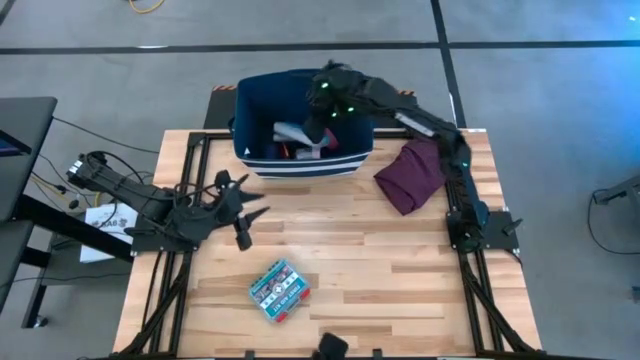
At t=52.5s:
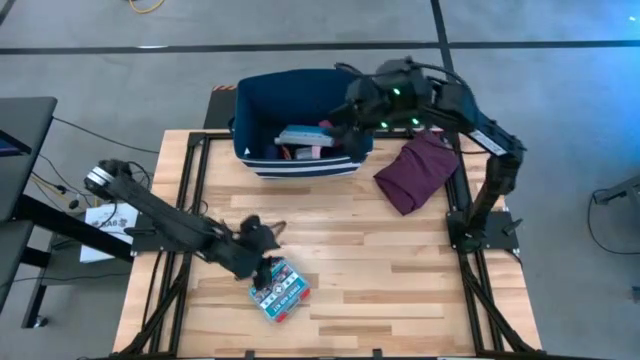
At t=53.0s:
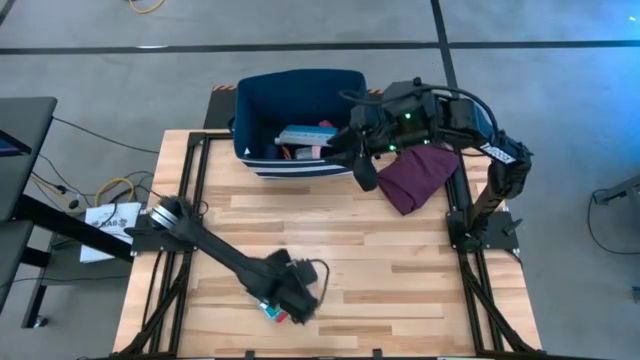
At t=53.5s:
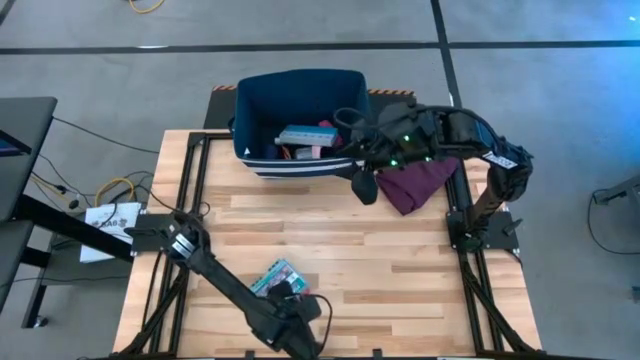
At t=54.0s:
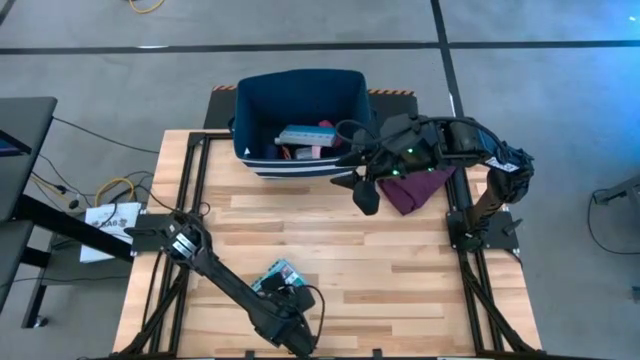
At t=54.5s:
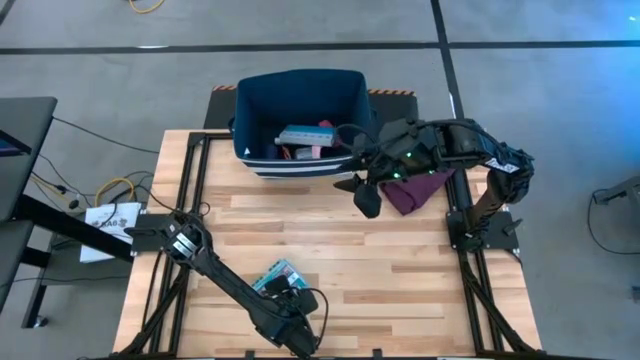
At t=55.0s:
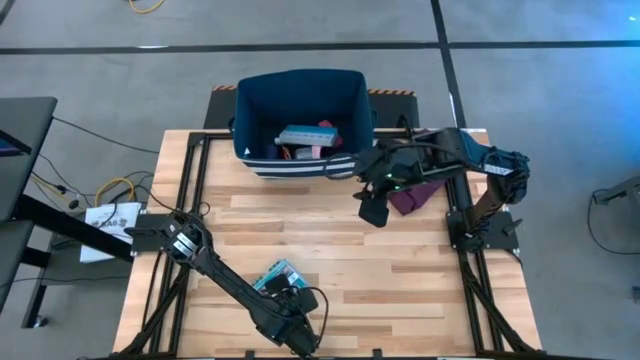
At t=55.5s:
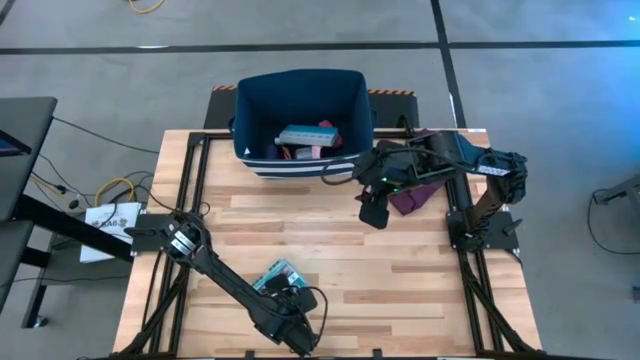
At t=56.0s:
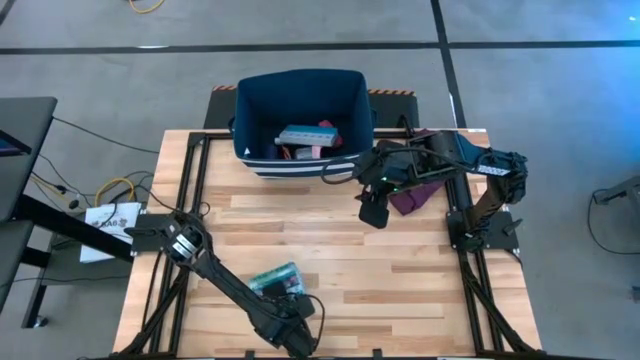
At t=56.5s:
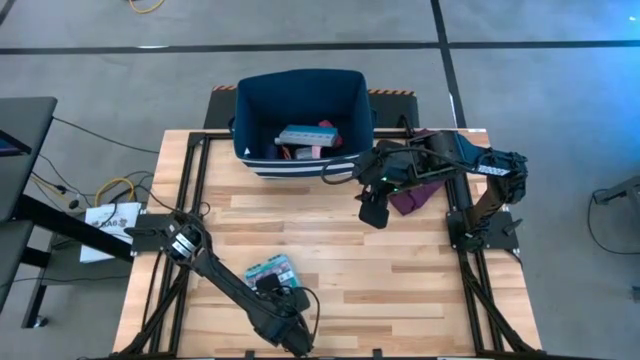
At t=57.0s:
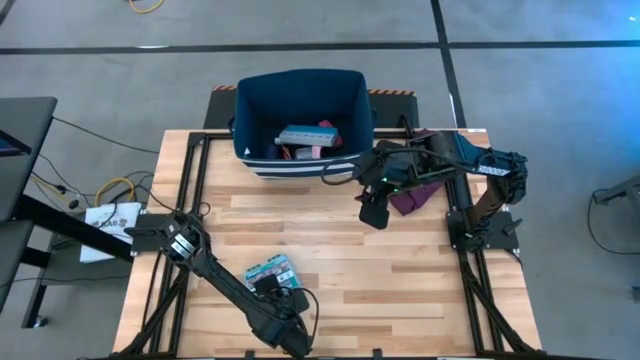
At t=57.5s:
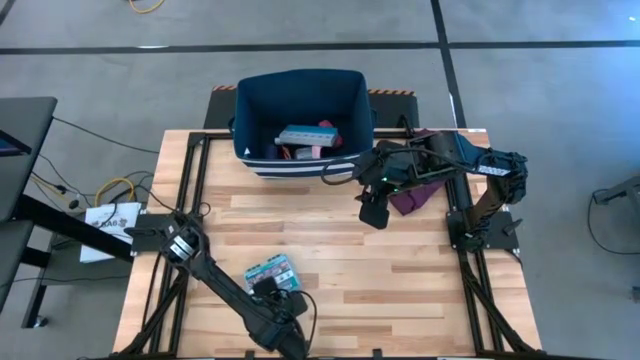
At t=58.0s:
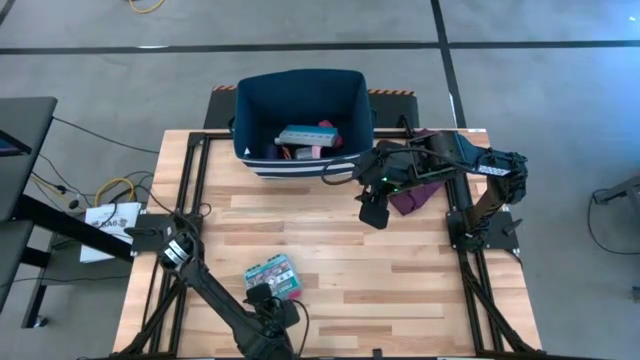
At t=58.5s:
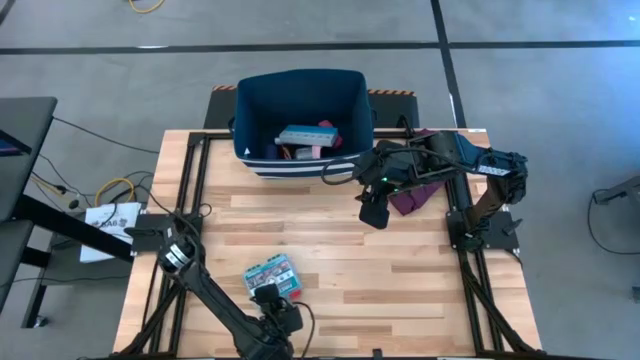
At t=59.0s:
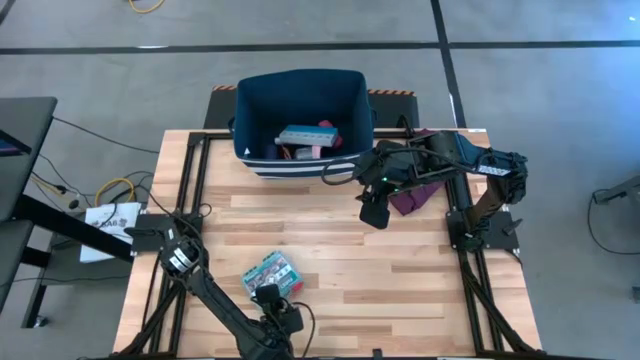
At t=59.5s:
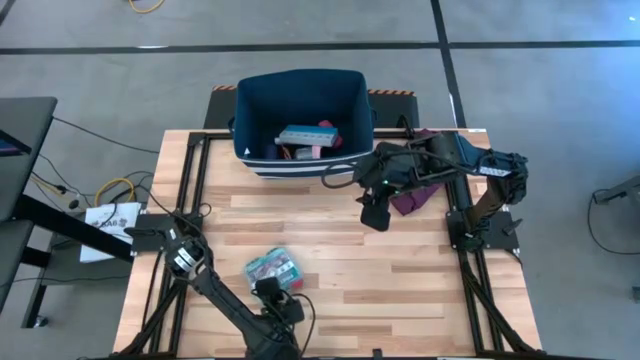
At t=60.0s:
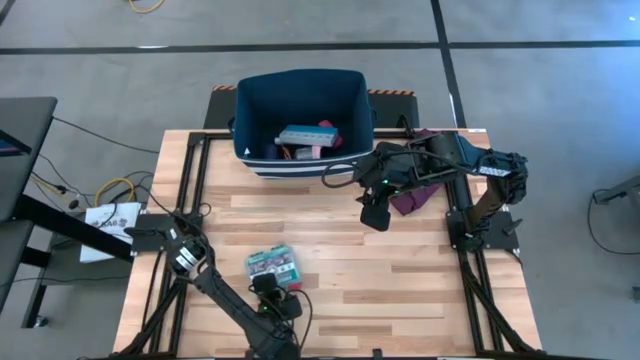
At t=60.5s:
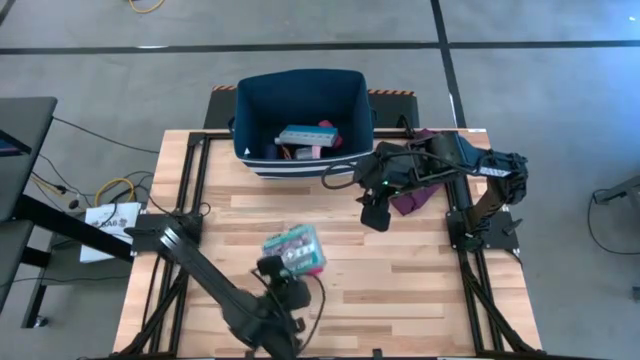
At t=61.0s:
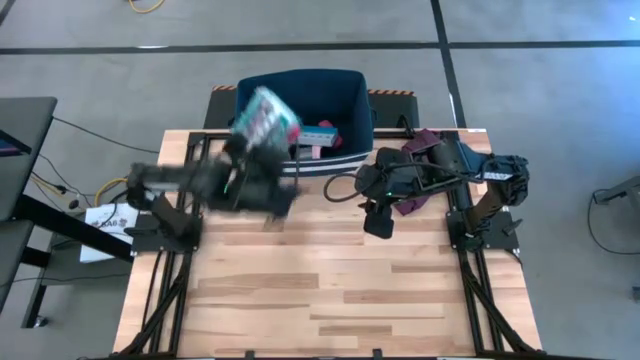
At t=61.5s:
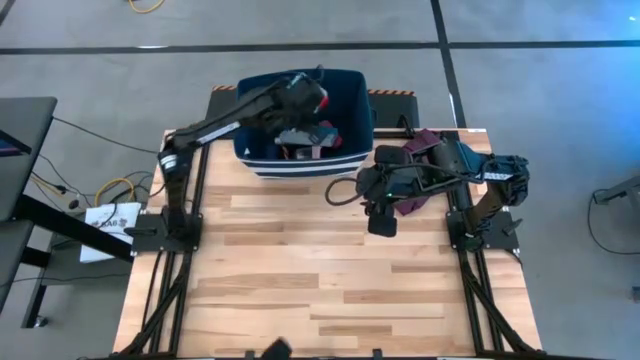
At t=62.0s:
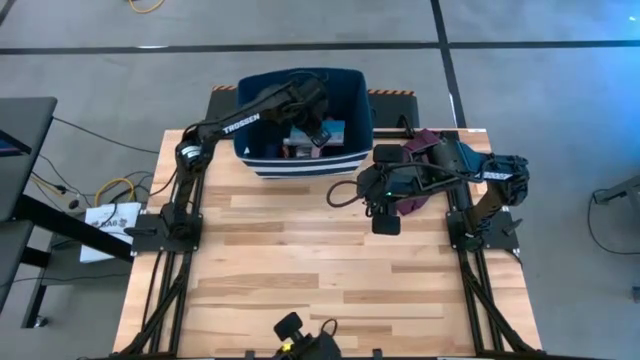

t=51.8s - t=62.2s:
Task: Pick & place medical supplies in basket/bin
Put the first aid kit box into the blue bin

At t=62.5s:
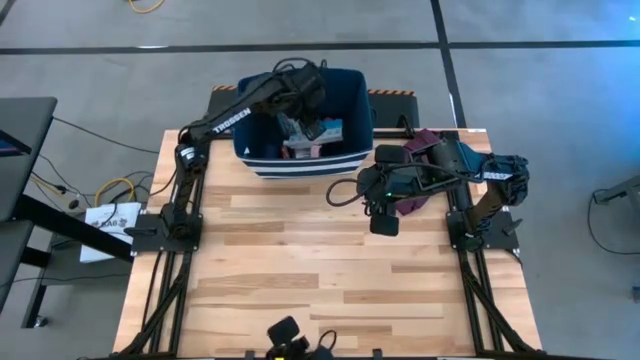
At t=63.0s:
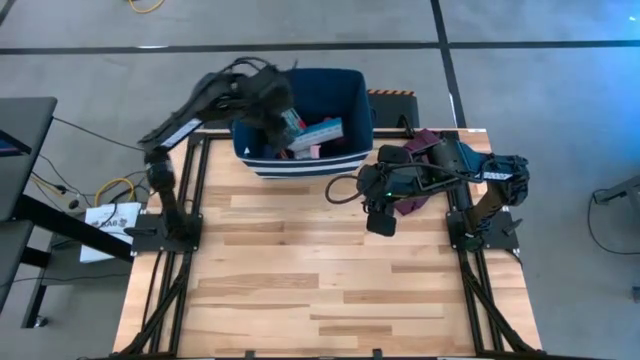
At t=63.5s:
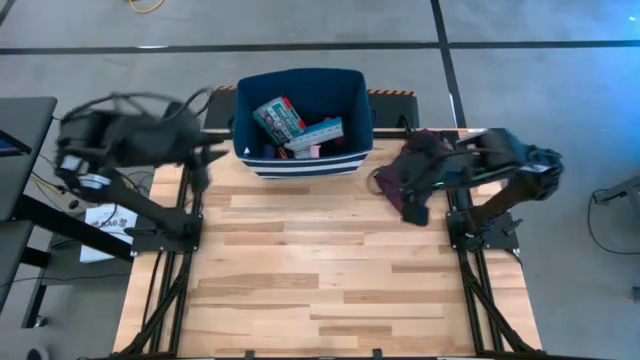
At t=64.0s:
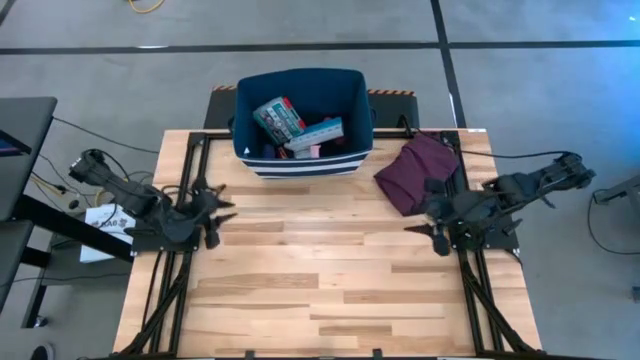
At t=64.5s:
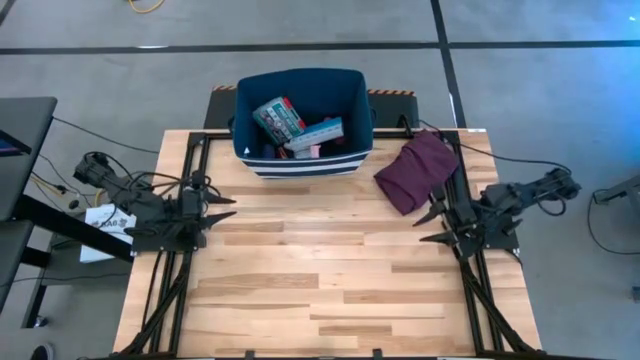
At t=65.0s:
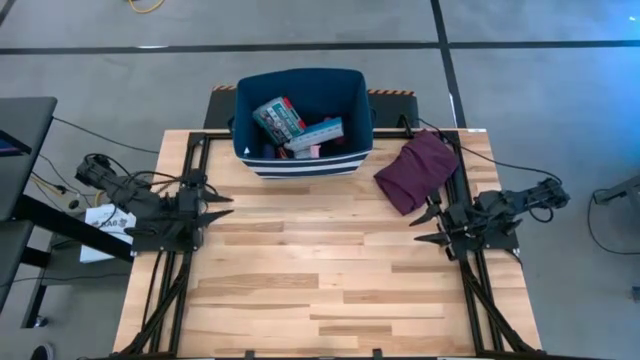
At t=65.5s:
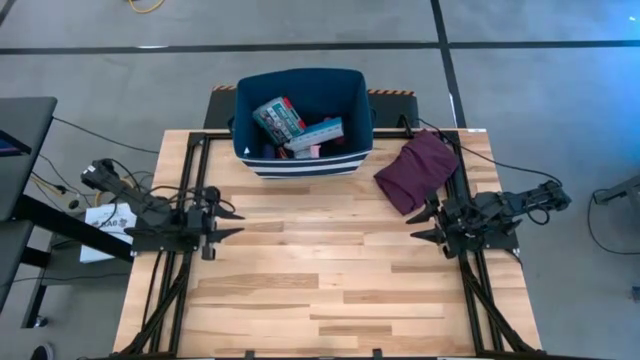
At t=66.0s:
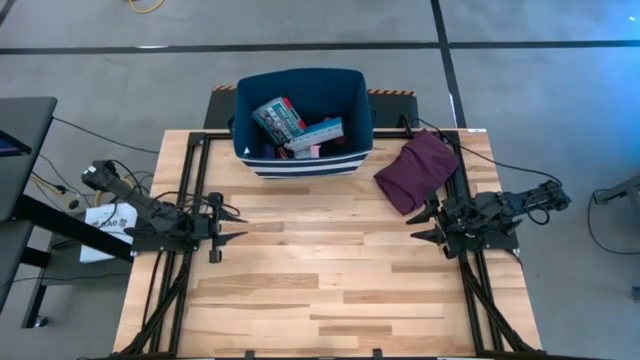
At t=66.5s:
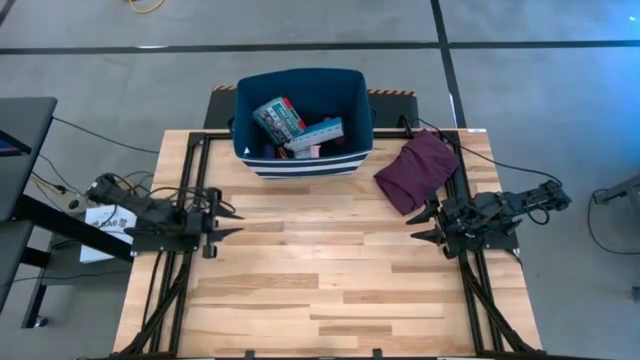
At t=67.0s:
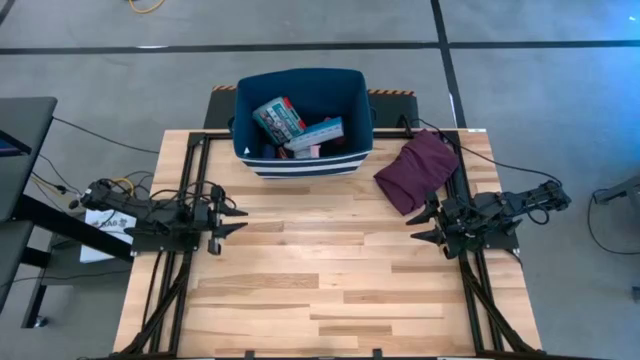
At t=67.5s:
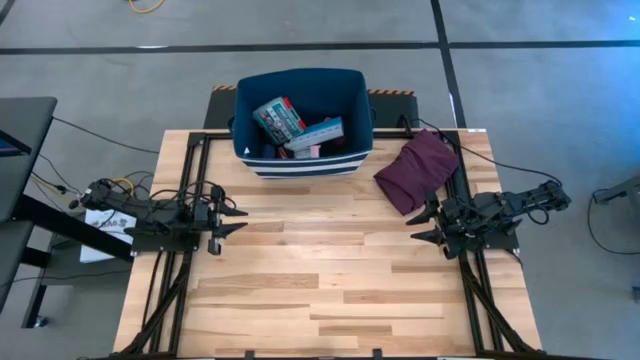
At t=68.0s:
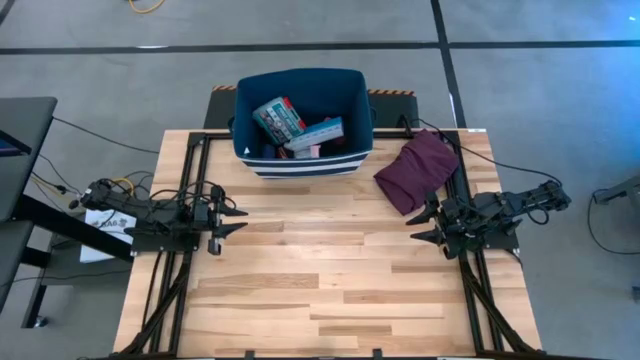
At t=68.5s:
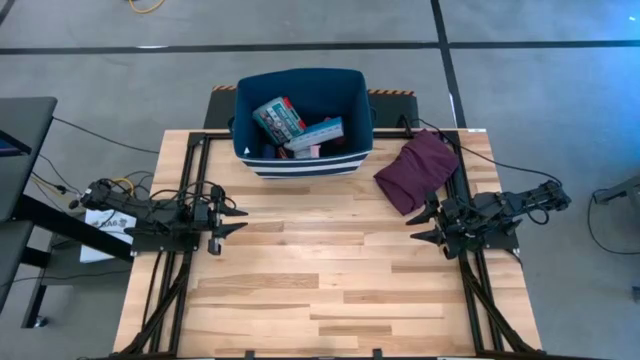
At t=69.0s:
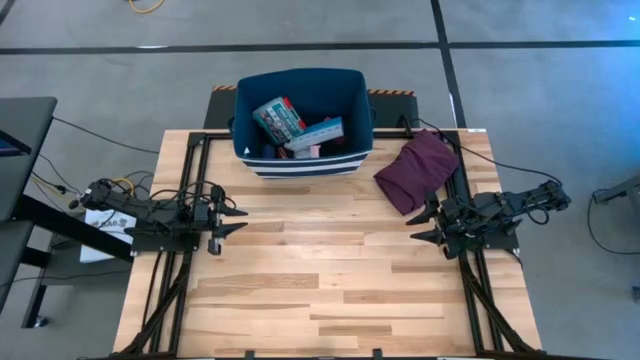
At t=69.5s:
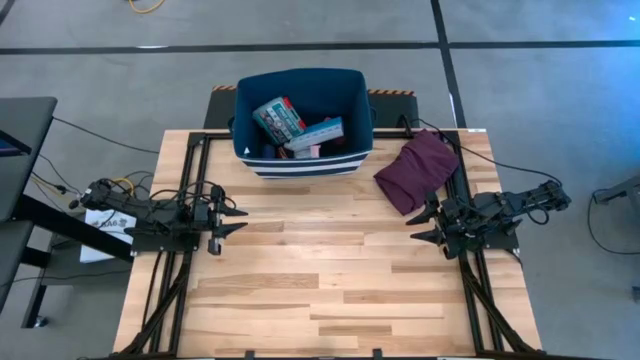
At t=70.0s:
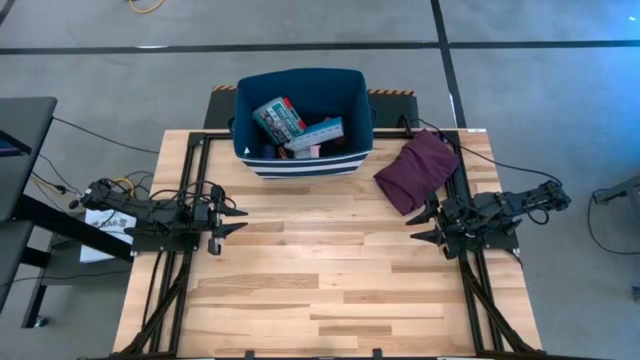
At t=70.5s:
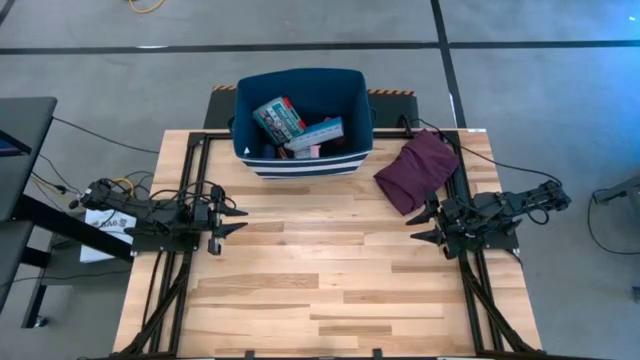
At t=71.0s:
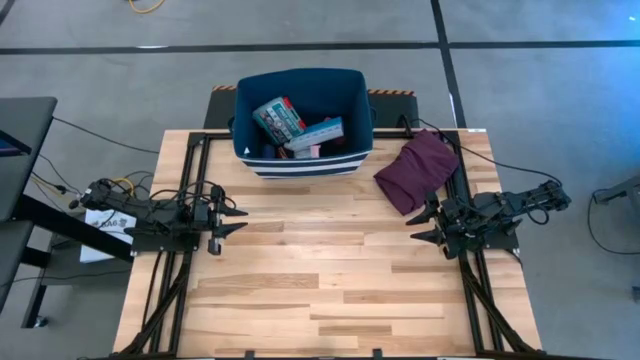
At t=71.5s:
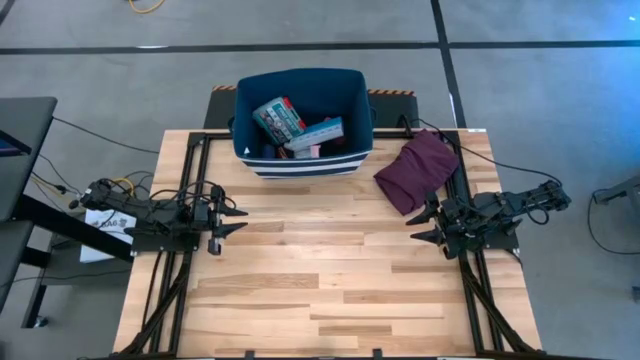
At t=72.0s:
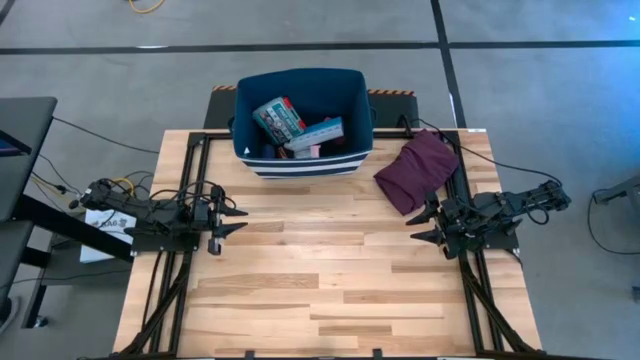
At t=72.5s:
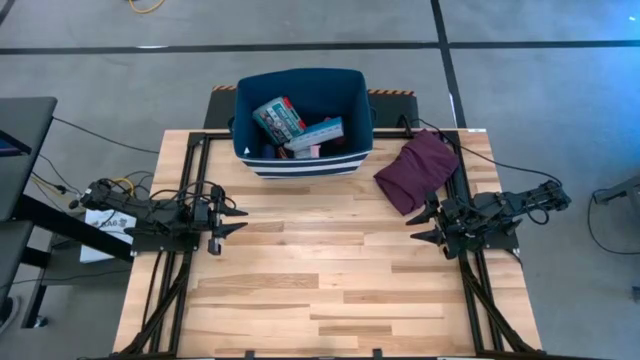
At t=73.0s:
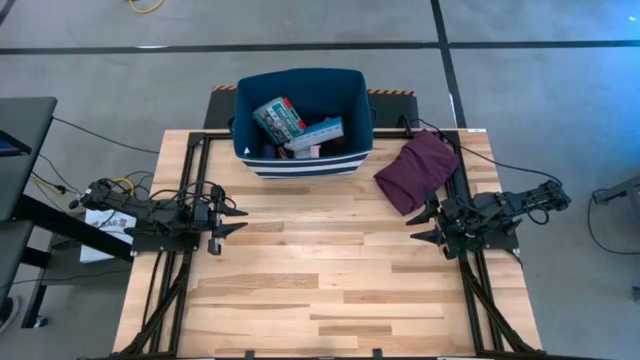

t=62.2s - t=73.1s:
Return to Home Position

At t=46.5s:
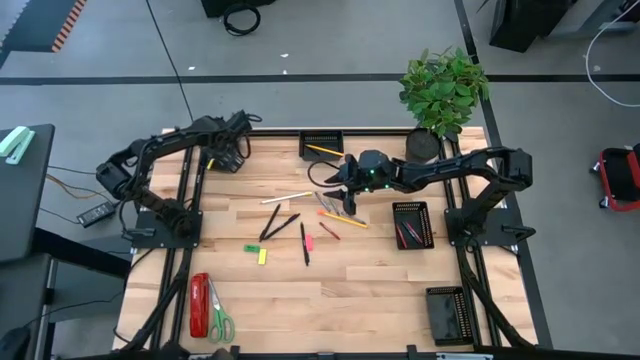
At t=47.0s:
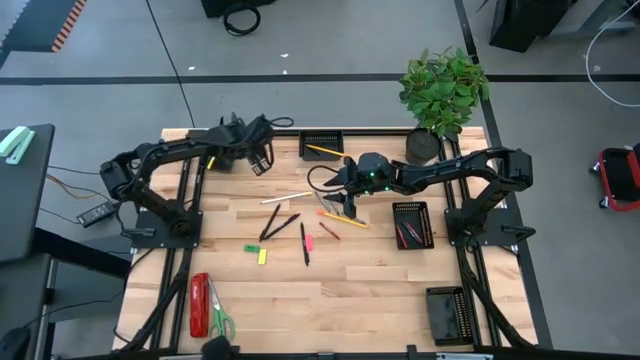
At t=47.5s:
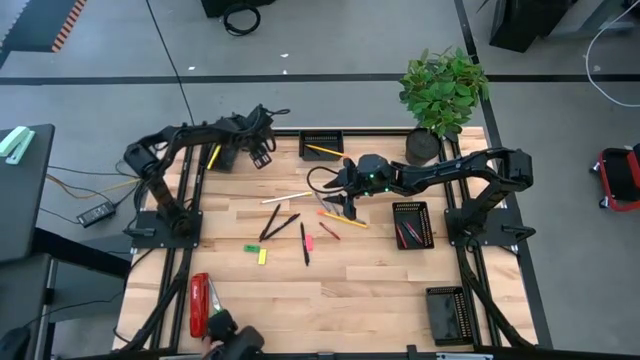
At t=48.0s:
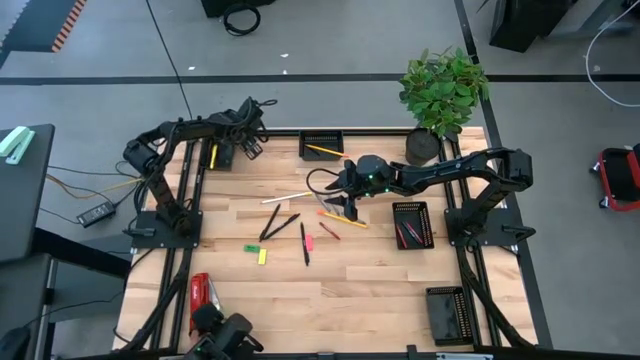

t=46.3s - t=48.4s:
Task: Sort crayons/erasers/pens/pencils in bins
Adjust the top left black bin
